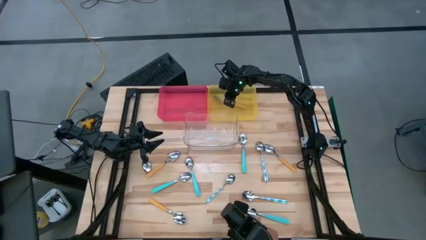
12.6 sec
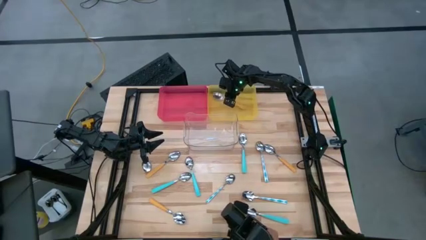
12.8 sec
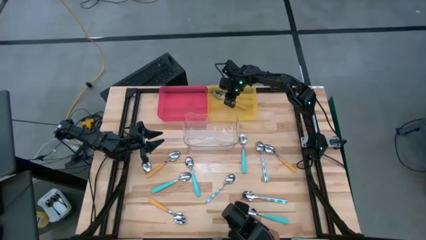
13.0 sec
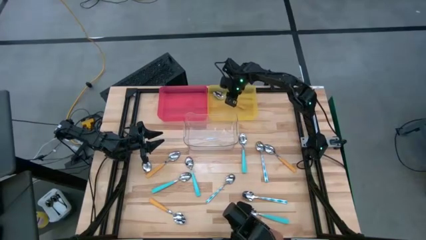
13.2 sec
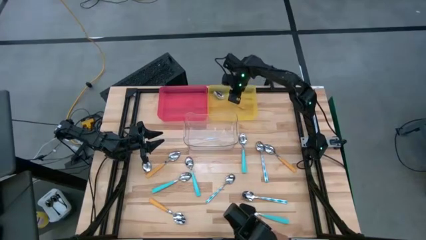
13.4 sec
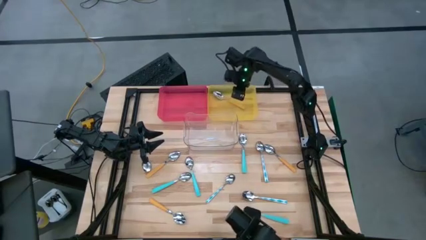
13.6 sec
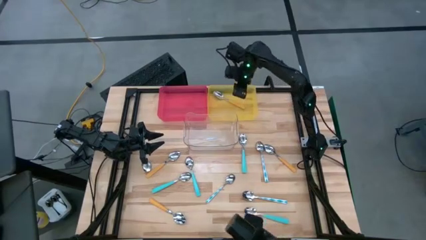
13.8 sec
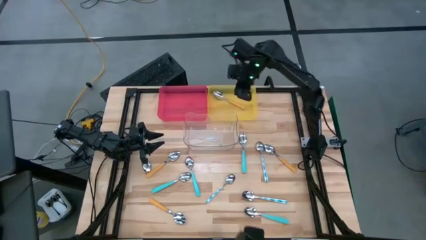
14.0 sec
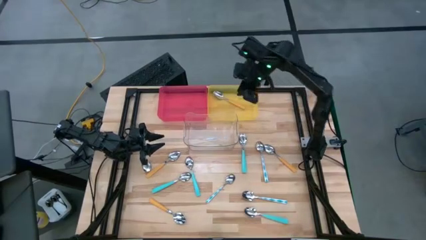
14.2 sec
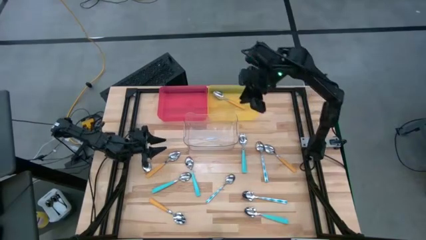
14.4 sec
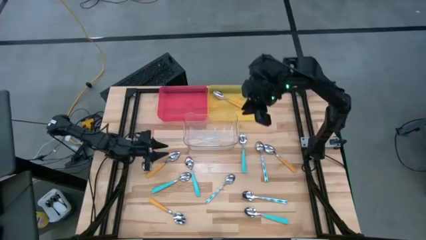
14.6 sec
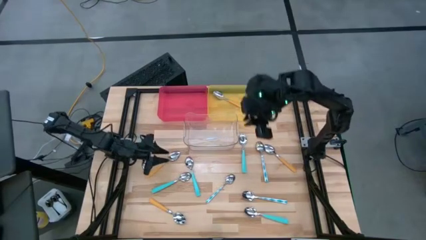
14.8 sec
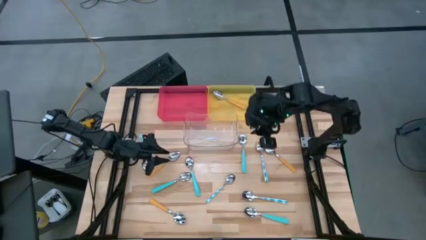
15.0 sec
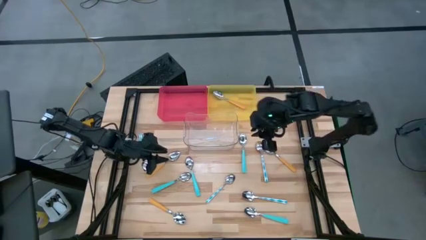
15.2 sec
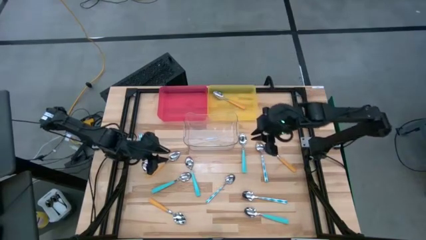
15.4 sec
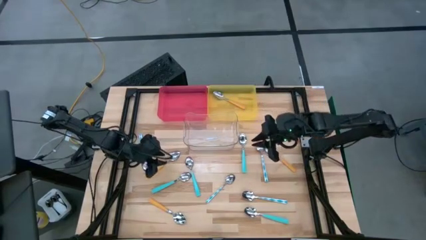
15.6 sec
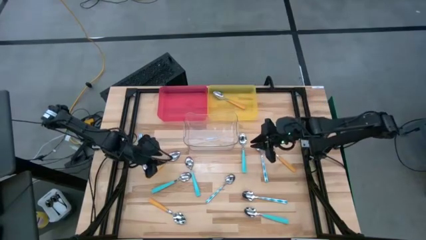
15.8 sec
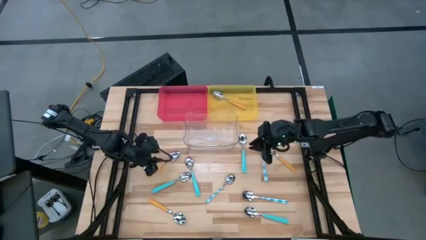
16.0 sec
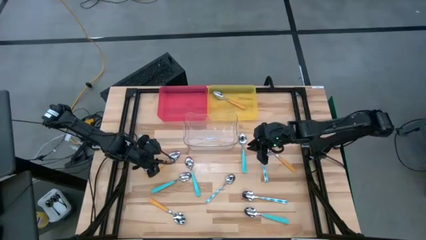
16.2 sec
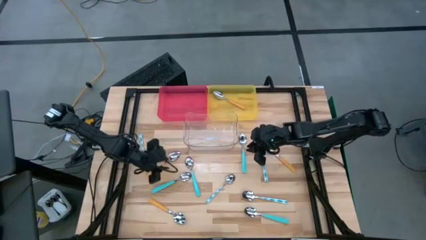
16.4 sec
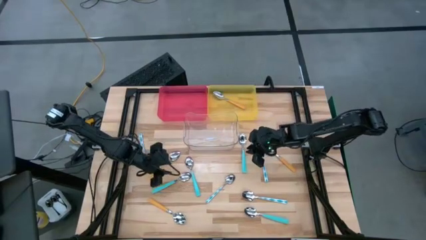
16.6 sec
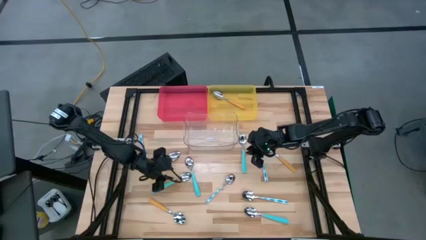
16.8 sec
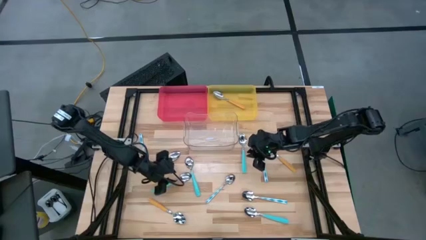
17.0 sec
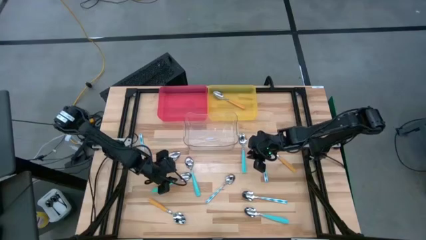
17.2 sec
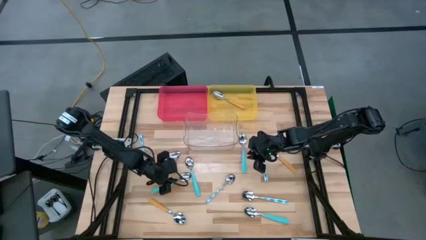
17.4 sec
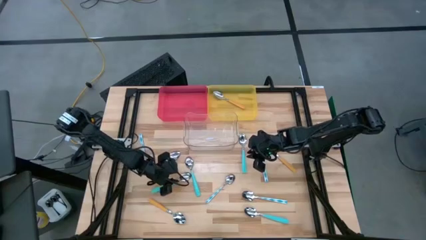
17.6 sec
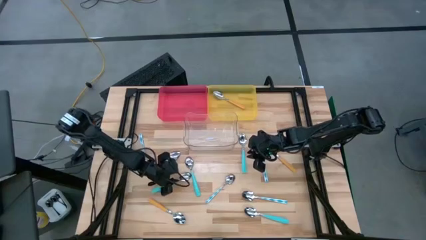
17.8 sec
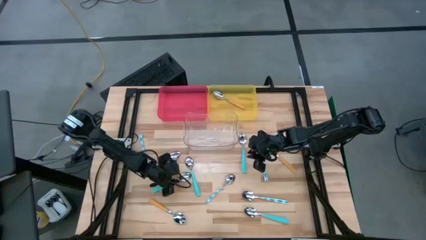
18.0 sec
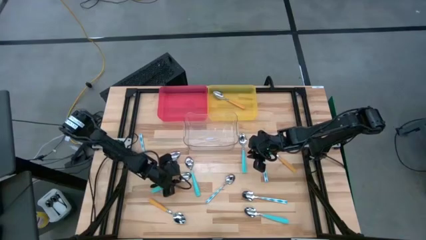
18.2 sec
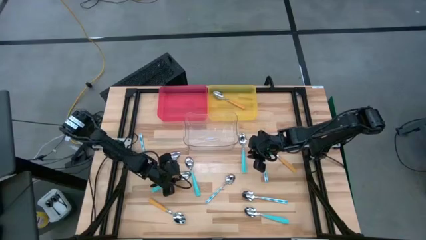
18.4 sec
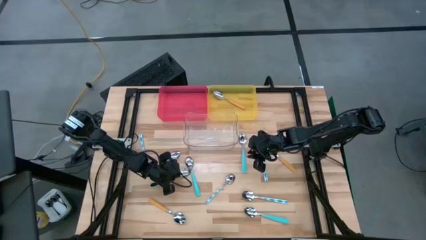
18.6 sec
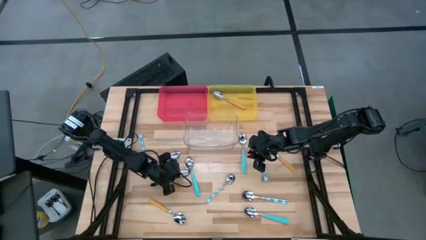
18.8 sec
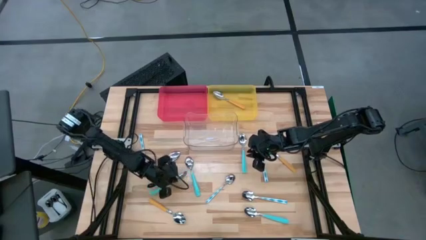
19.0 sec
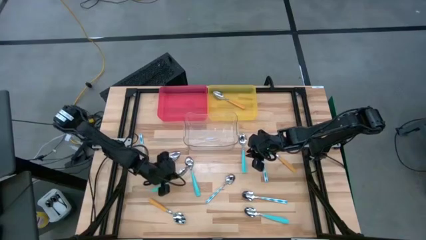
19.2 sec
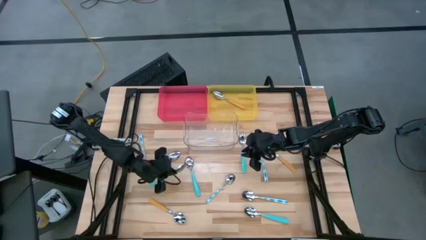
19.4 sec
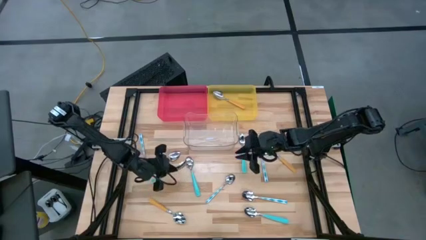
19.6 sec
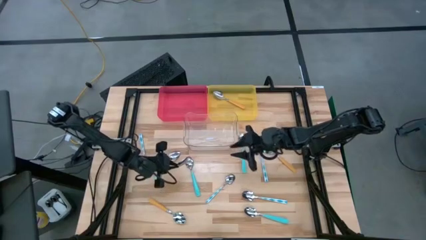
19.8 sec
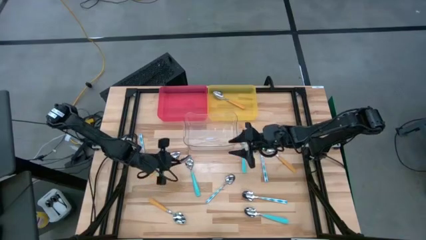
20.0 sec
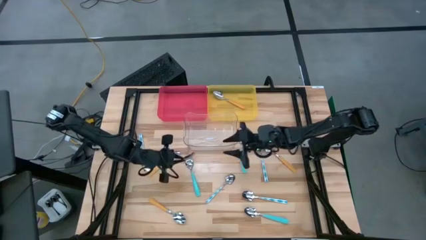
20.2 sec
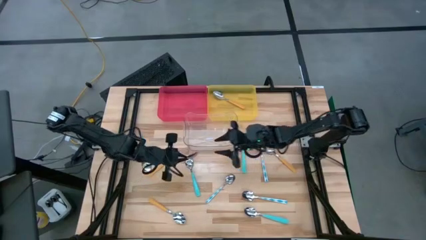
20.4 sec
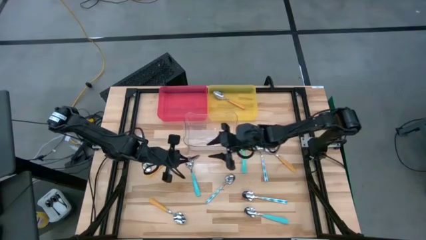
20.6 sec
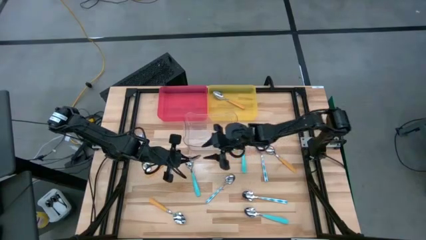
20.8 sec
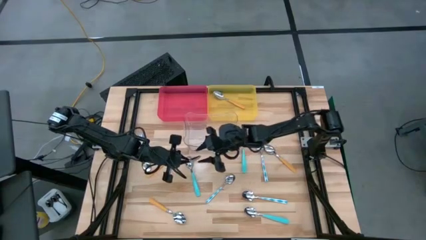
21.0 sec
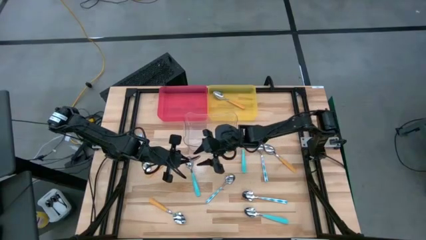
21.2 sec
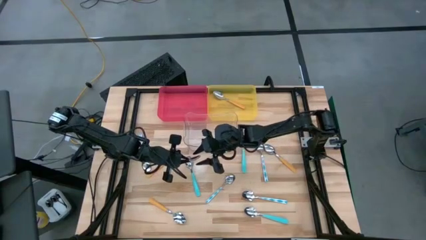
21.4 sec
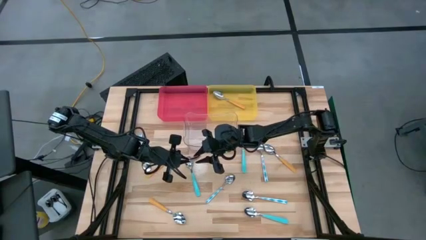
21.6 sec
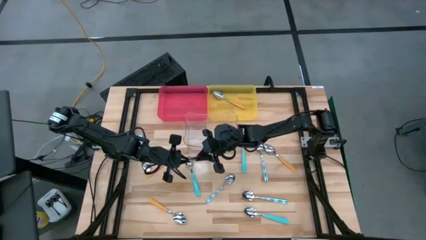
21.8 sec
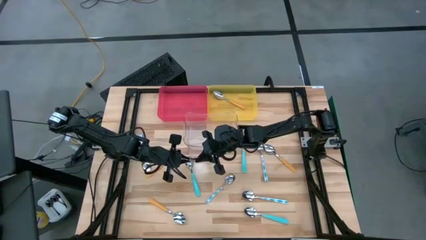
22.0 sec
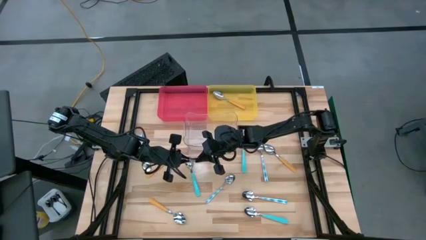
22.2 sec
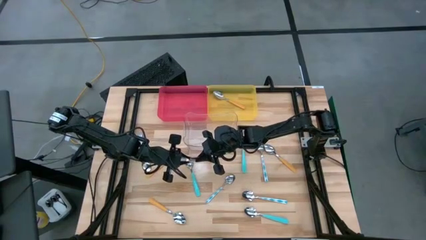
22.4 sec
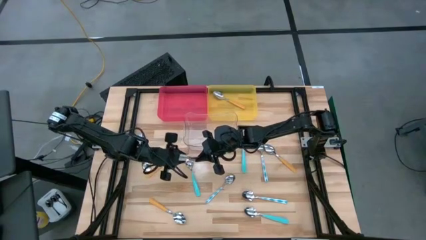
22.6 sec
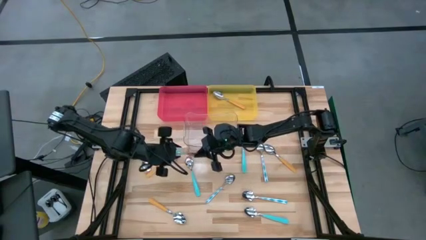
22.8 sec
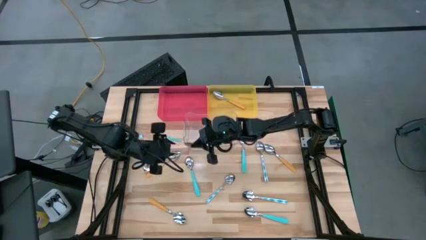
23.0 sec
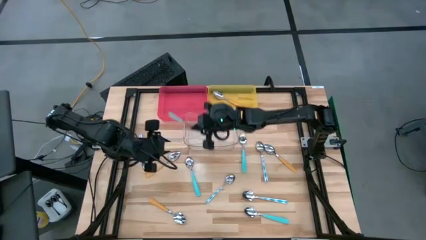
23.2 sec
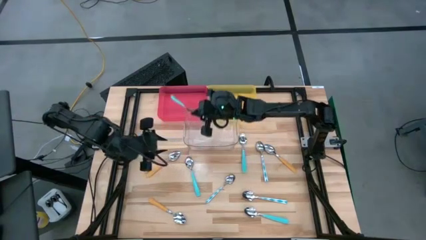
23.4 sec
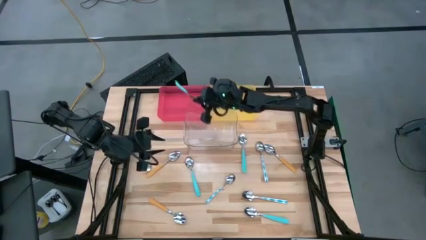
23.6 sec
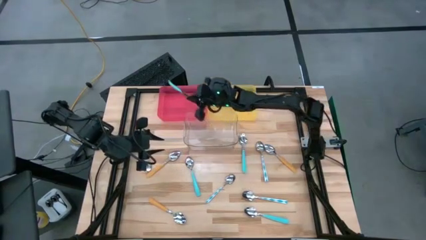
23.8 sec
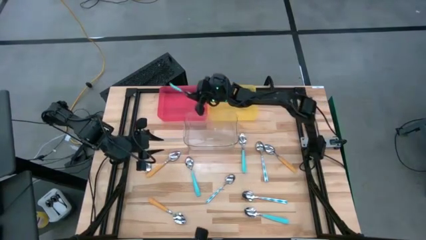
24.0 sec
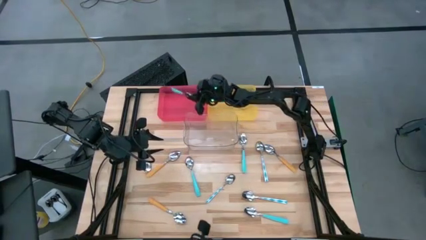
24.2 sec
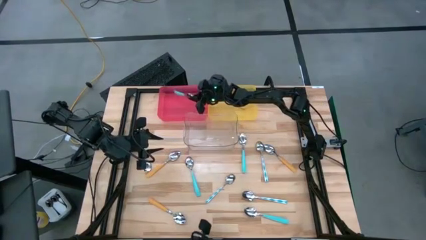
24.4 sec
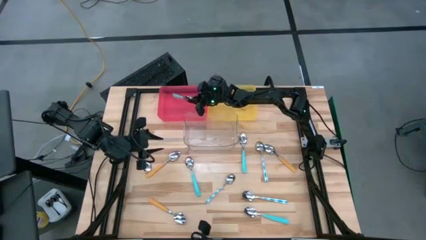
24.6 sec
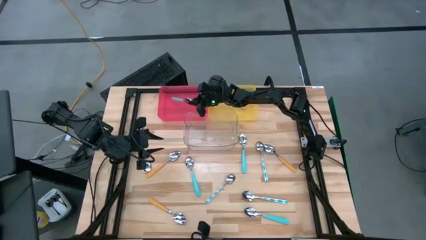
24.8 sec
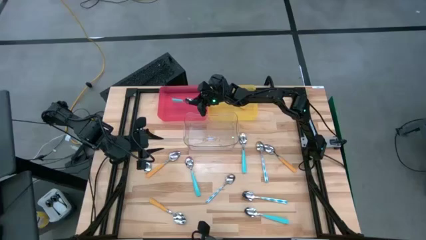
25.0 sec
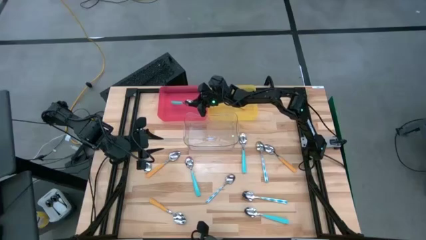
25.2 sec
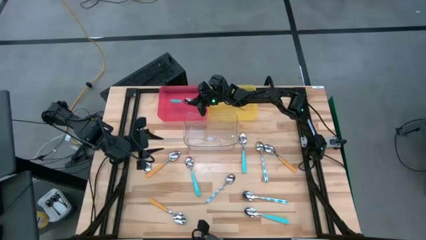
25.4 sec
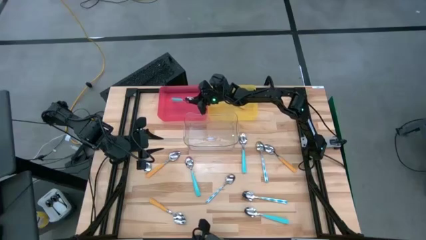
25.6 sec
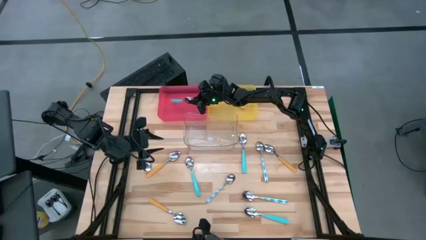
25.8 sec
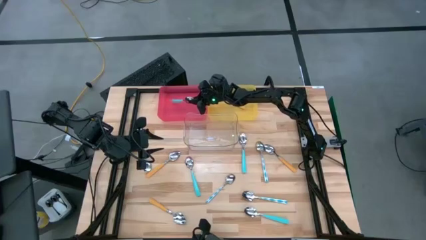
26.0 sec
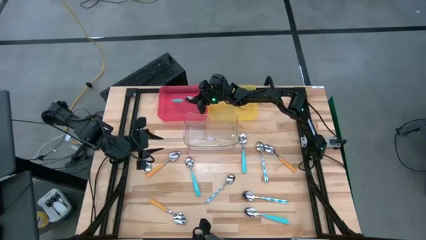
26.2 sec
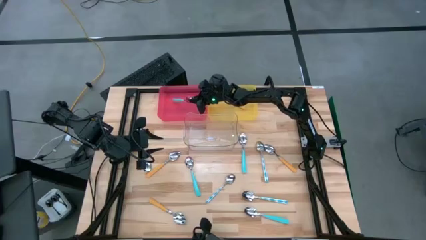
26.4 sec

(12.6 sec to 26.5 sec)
Task: Sort silverware by color (type)
Put the light green spoon into the red bin

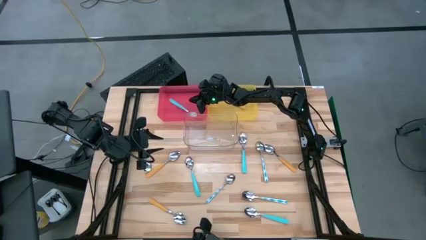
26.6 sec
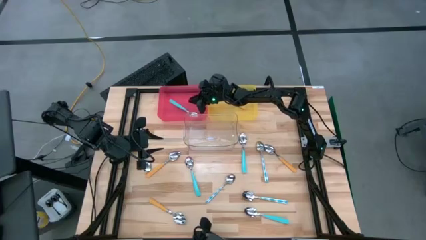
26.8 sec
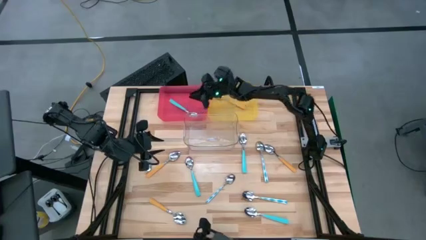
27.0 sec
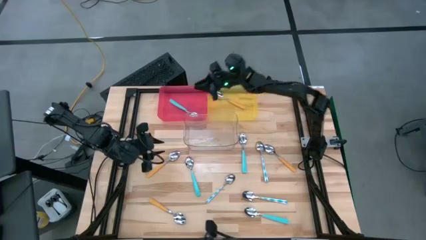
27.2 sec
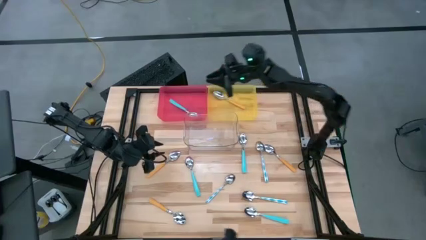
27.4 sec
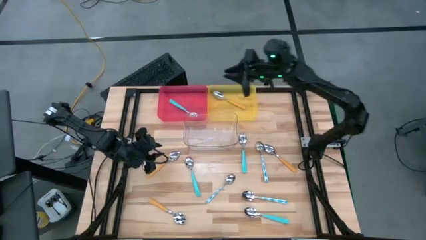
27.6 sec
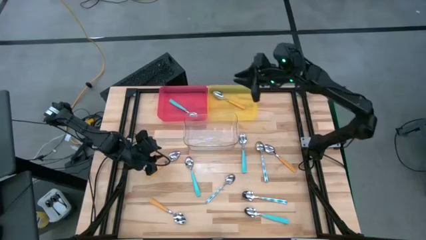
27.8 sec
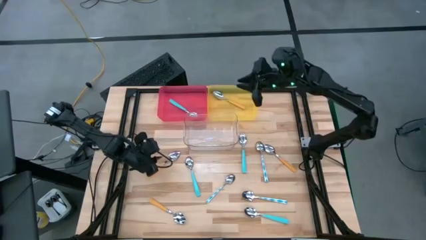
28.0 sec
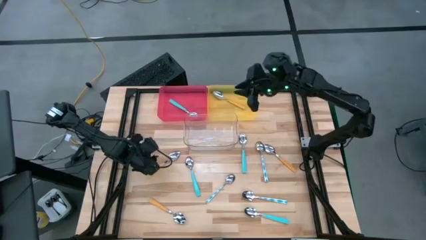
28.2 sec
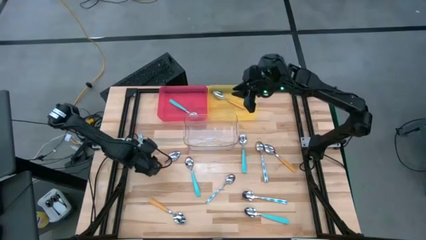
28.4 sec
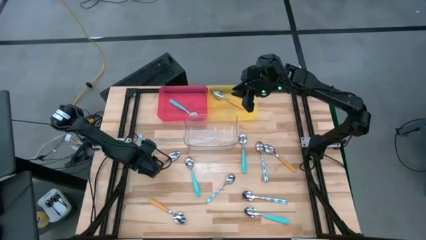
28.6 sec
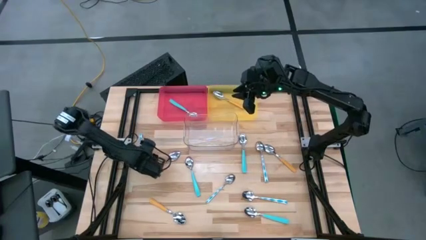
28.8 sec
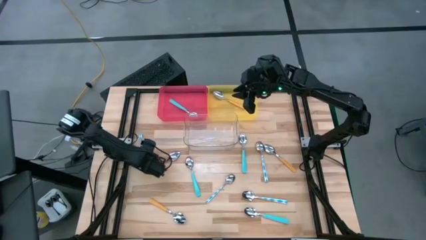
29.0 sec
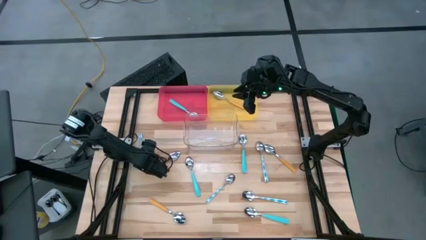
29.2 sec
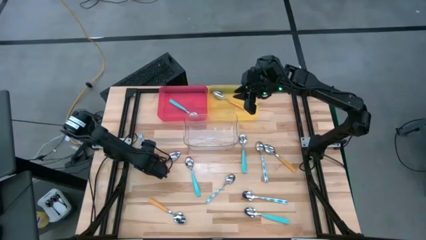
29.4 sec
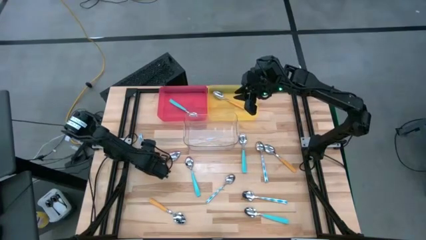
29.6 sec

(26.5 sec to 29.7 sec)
Put the green patterned spoon into the transparent bin
